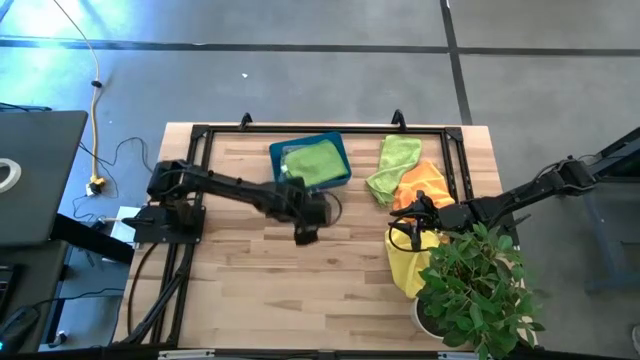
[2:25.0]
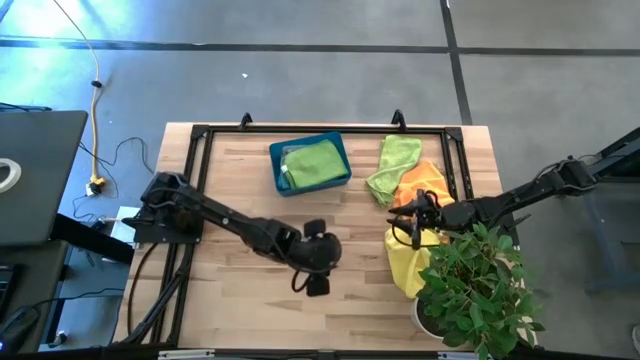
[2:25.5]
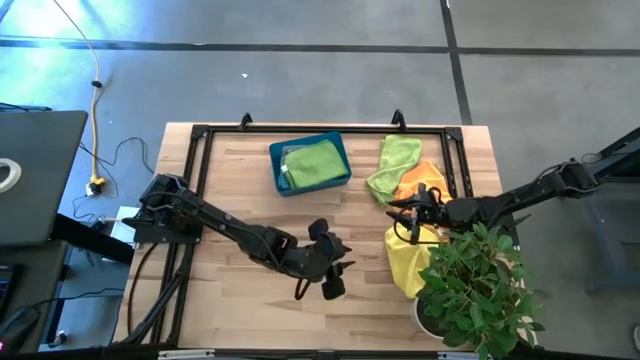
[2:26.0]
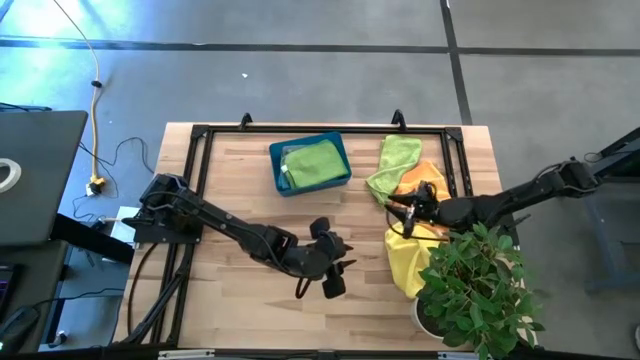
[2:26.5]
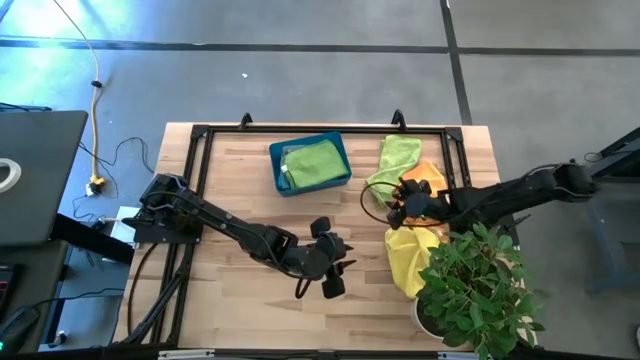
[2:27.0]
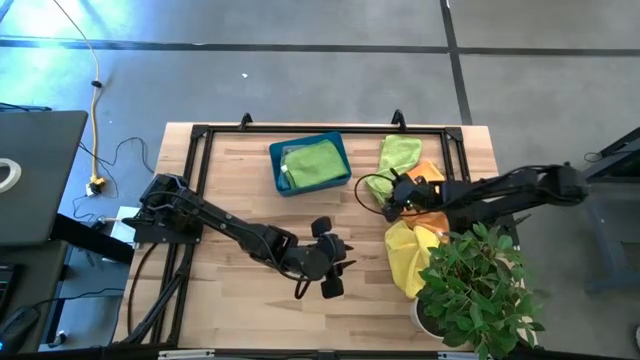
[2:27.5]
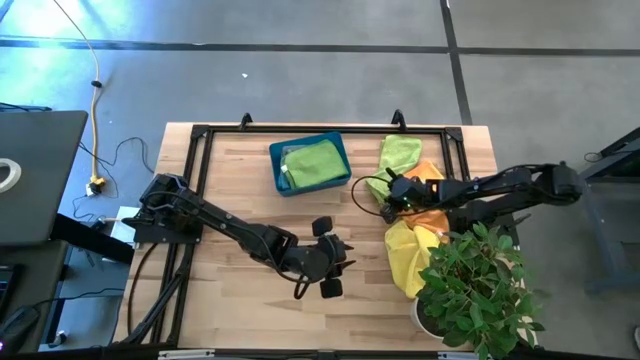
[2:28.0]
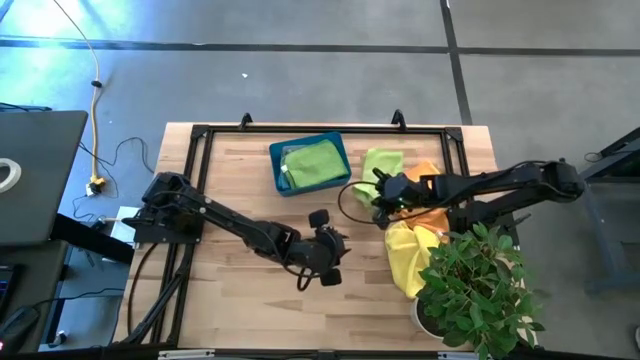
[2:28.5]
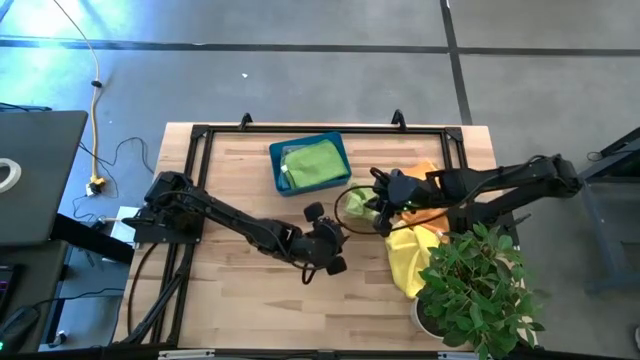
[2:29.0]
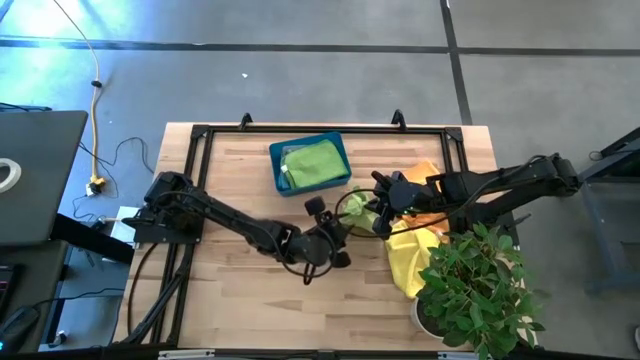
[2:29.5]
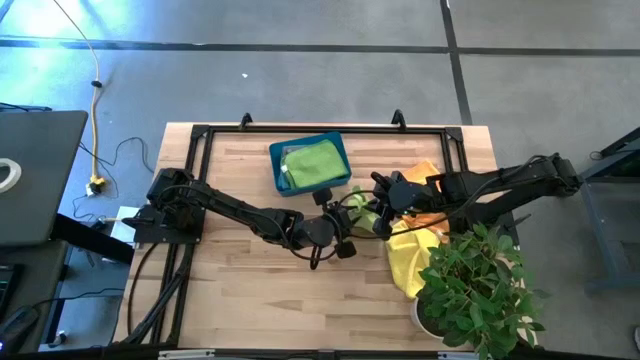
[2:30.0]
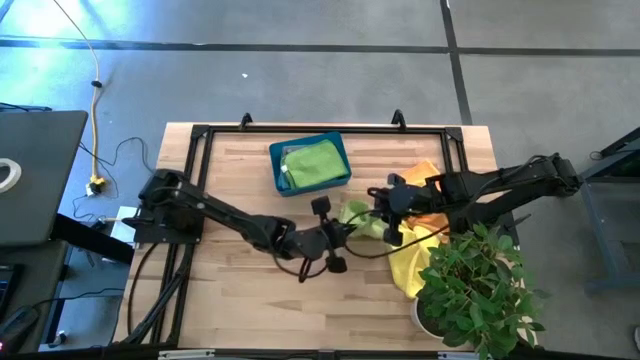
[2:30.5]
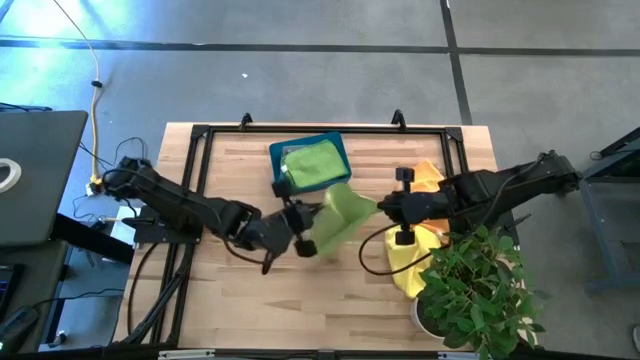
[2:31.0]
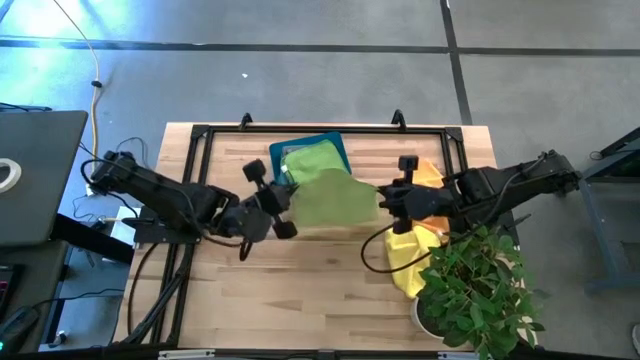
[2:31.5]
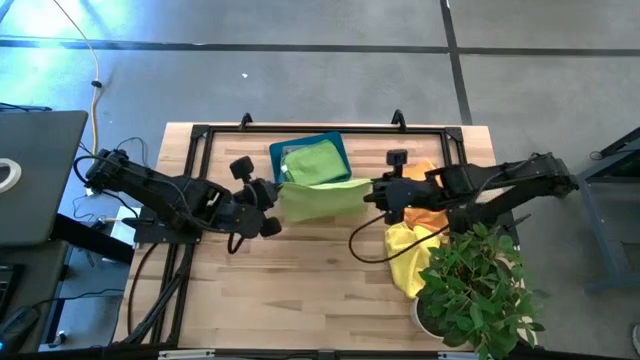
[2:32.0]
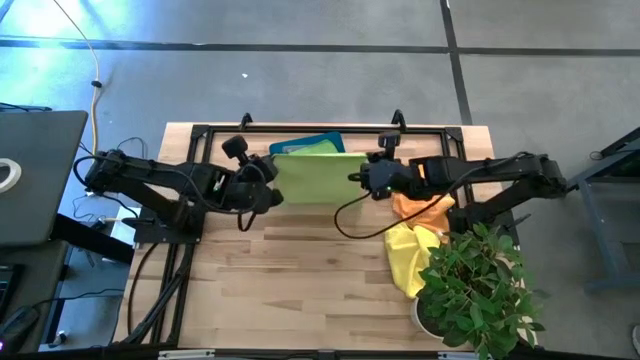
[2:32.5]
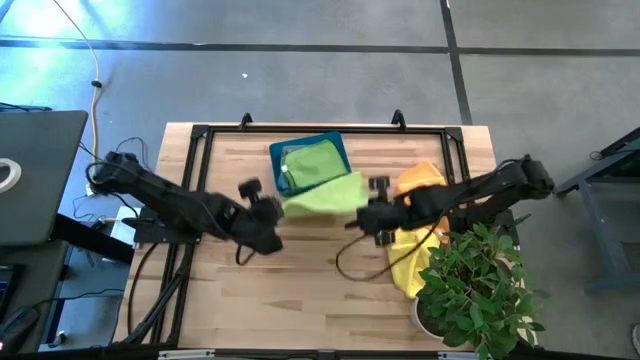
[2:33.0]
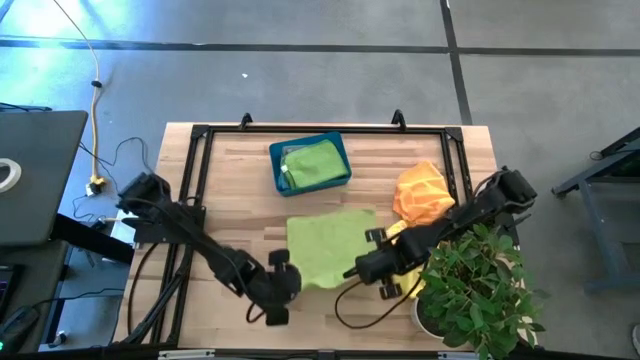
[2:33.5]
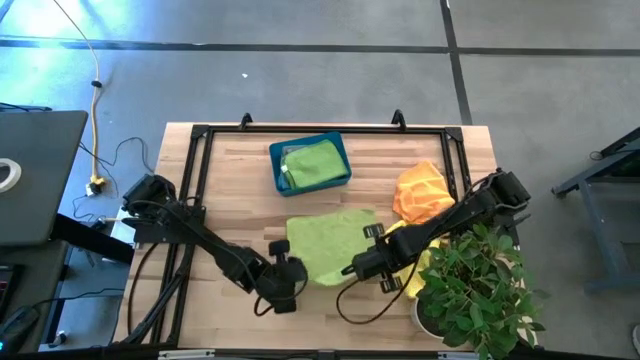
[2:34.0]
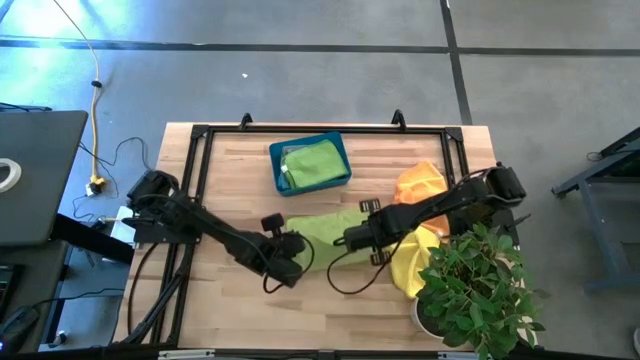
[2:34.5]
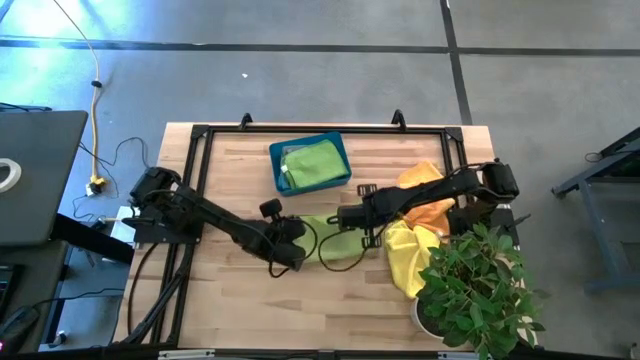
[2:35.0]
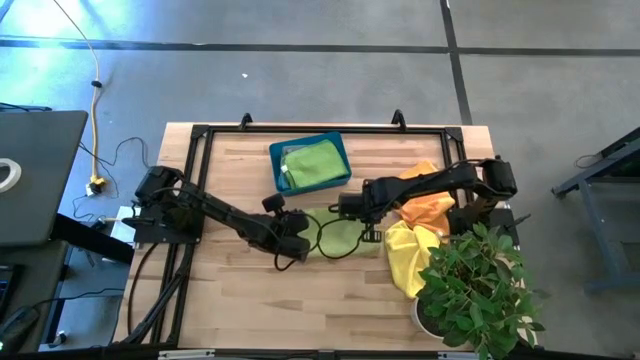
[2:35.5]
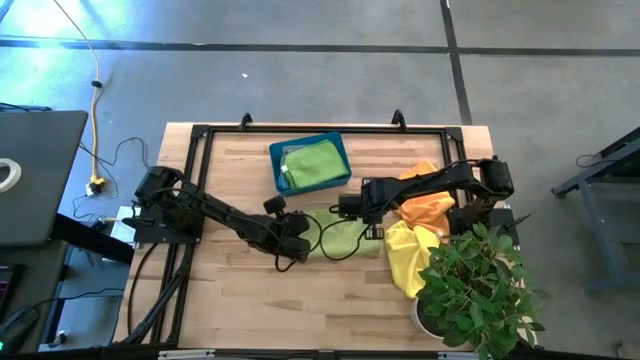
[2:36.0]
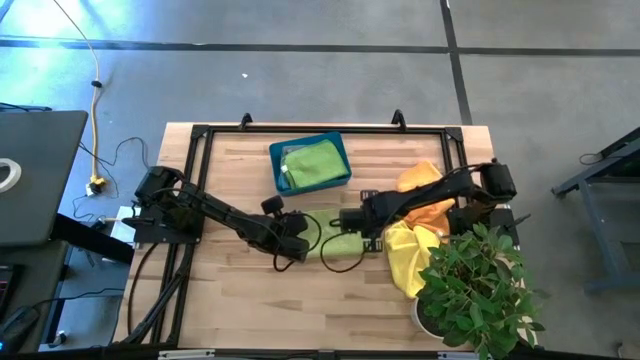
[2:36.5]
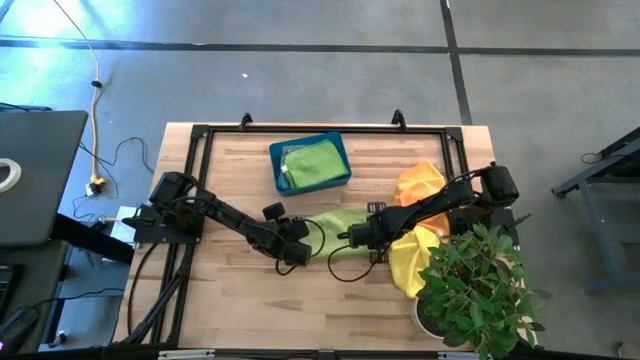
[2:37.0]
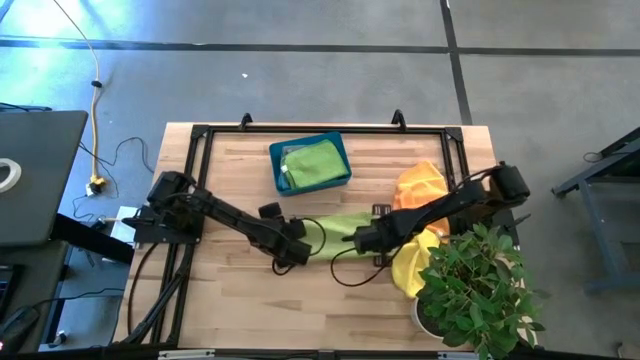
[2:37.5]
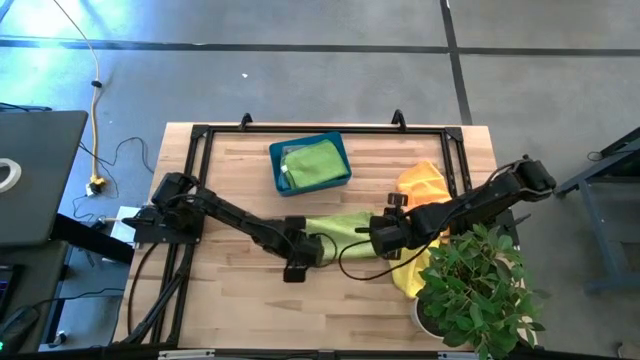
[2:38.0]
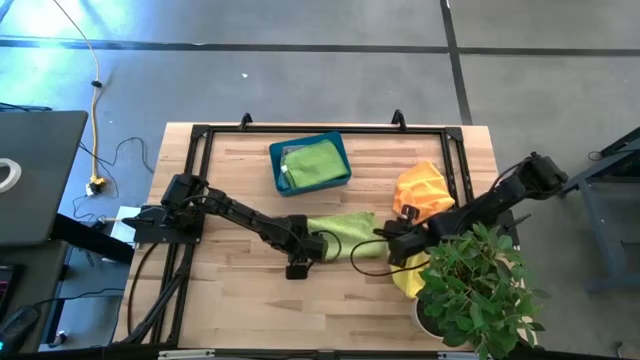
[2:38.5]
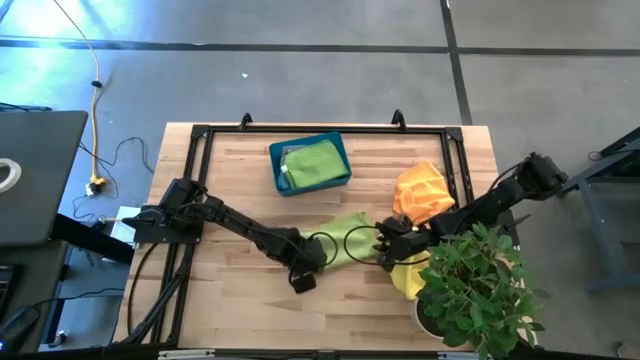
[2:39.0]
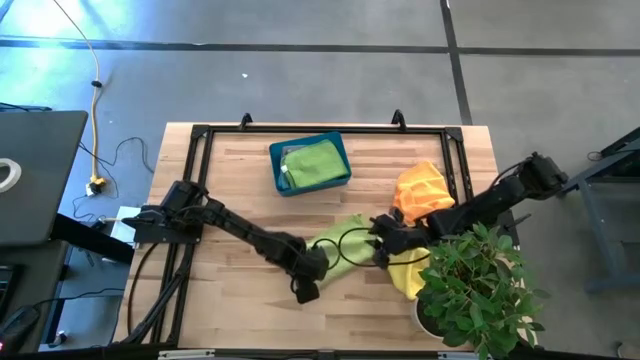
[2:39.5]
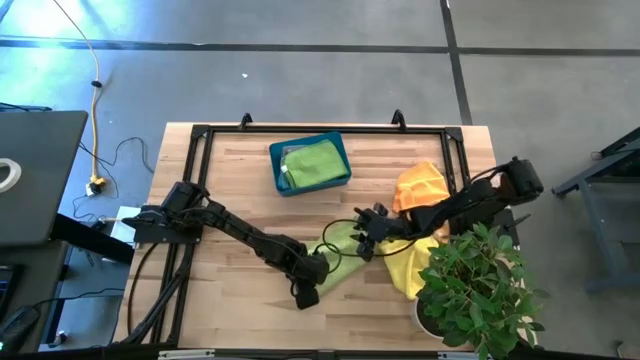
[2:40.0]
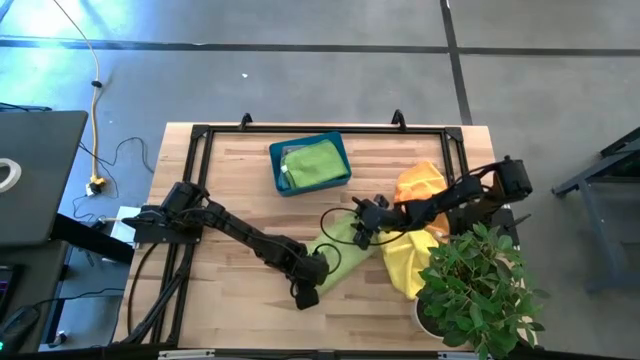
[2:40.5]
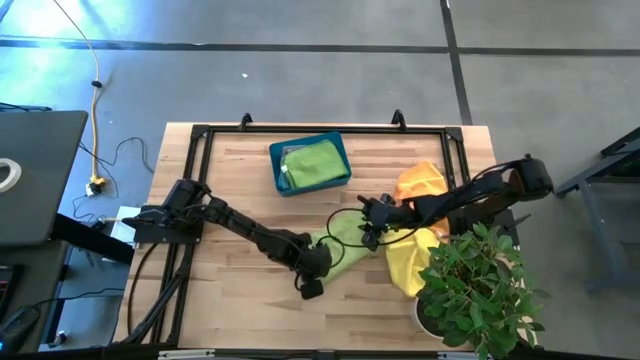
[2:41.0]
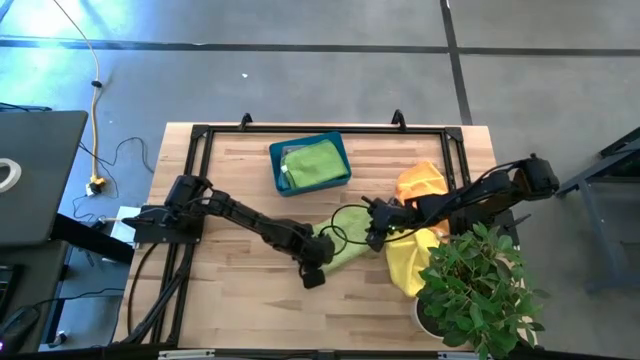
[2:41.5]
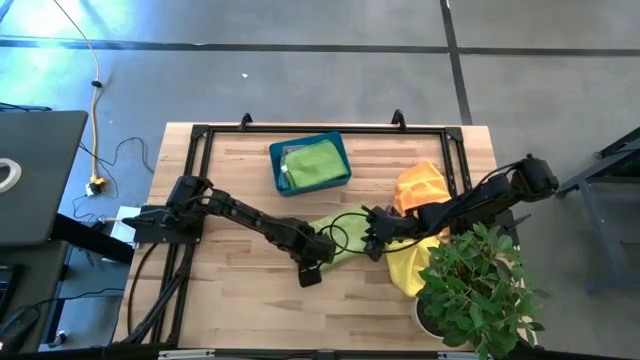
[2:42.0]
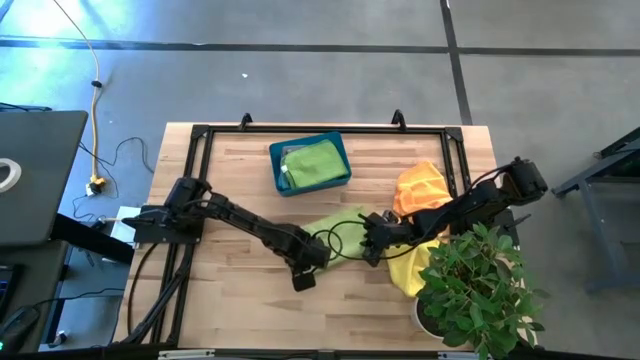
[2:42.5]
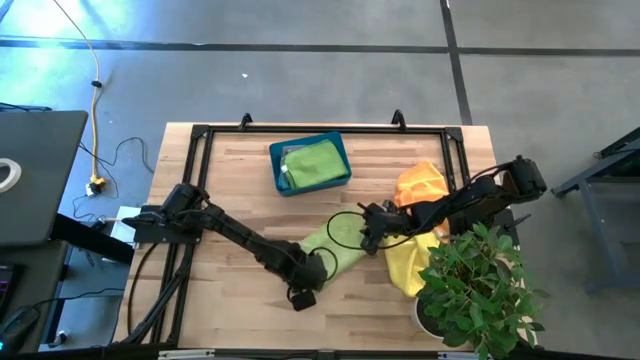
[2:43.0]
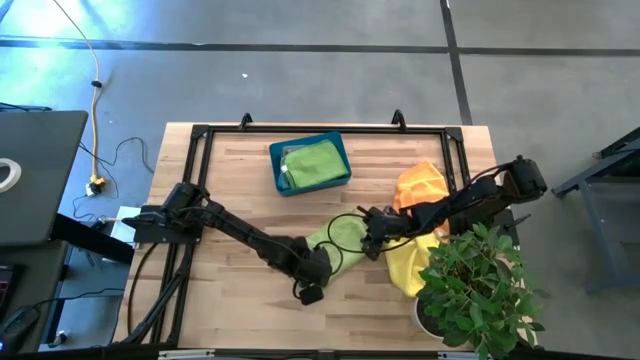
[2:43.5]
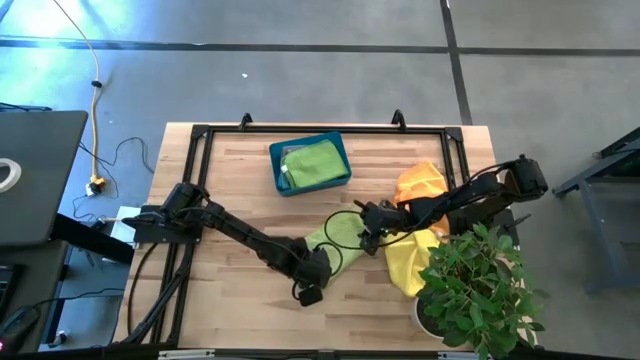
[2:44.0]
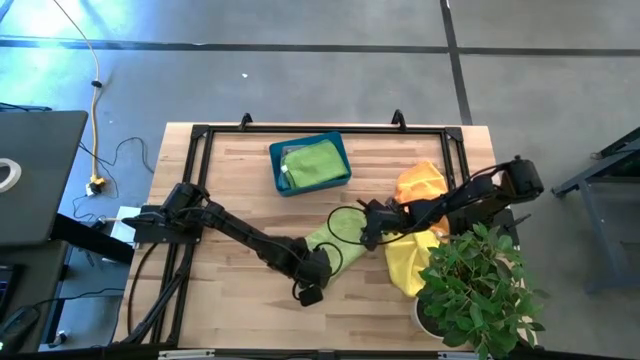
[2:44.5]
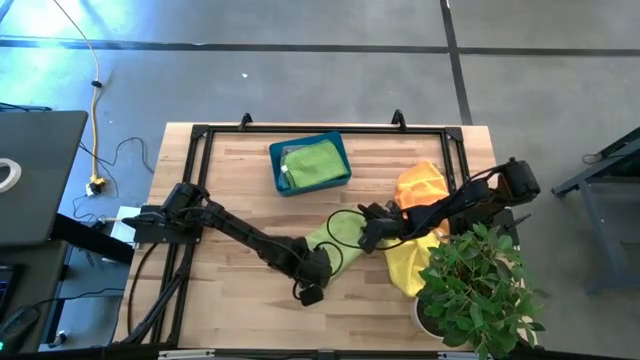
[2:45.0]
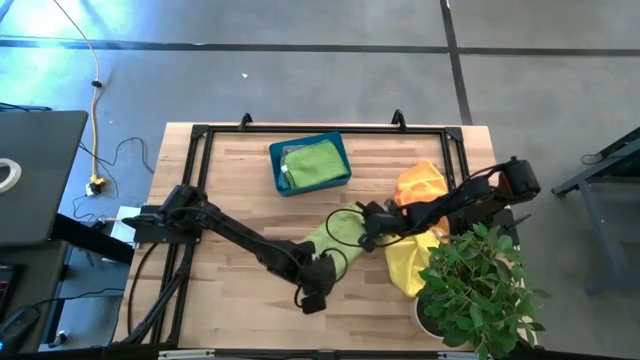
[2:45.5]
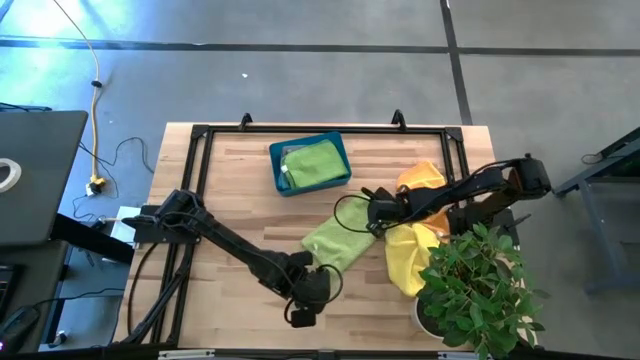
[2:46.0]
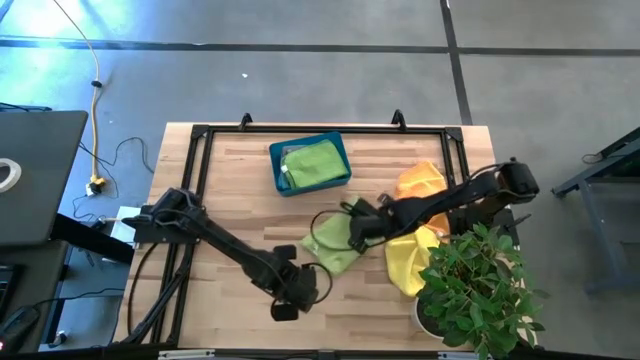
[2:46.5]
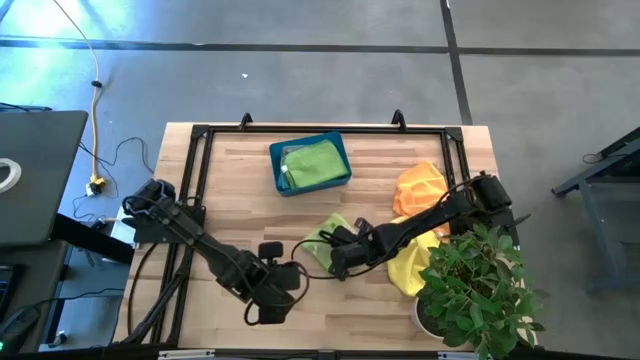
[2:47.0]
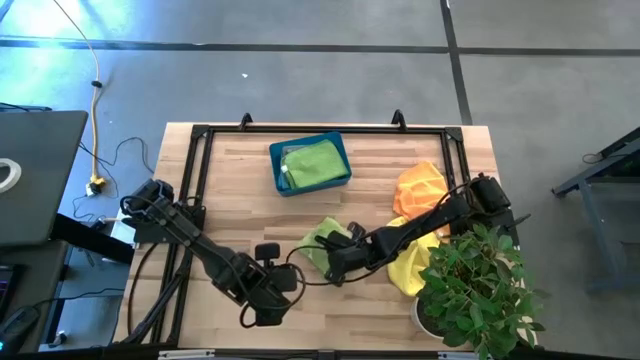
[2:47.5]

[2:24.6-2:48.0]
Task: Fold microfiber towels
Fold the green microfiber cloth
